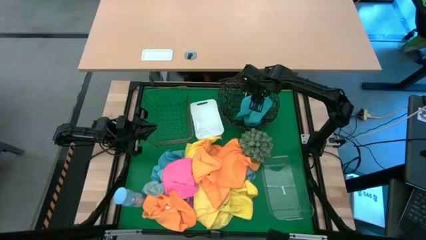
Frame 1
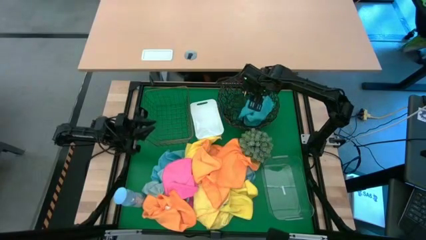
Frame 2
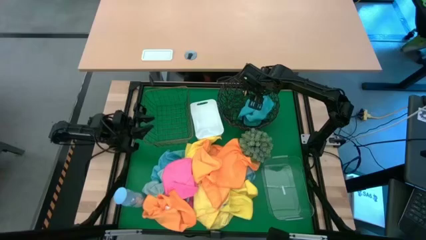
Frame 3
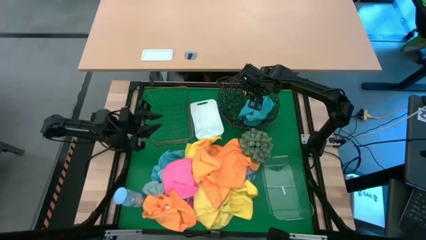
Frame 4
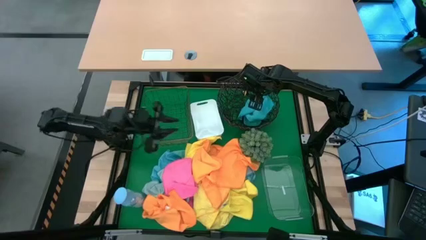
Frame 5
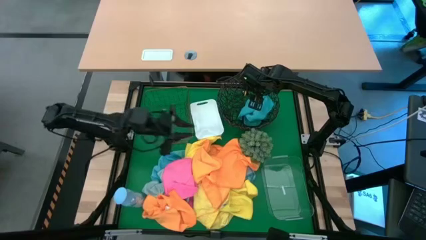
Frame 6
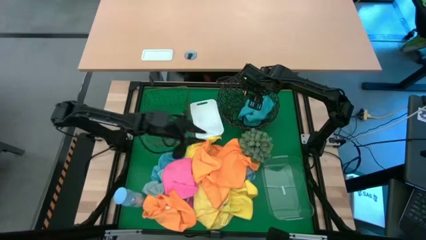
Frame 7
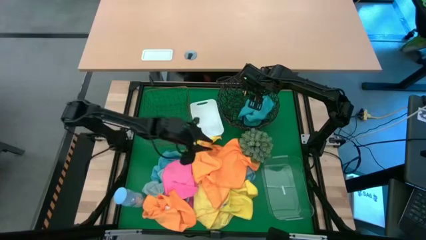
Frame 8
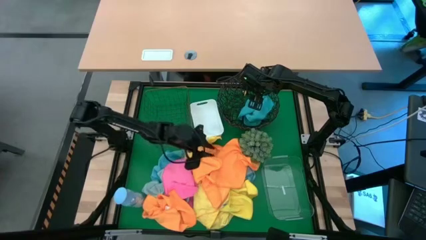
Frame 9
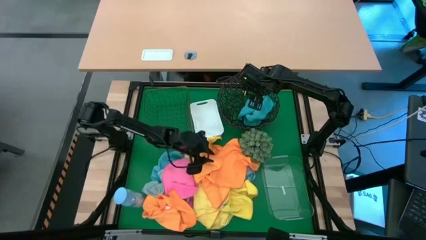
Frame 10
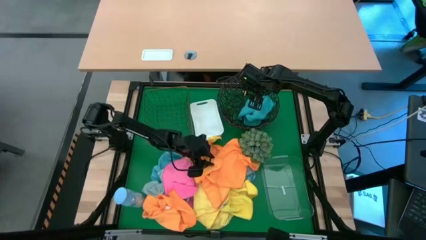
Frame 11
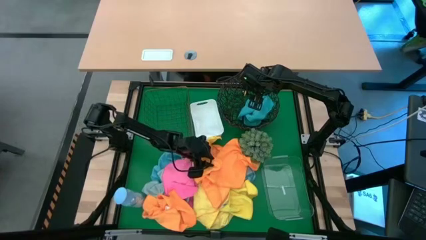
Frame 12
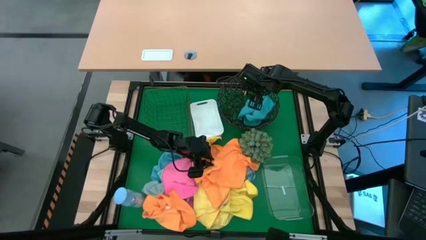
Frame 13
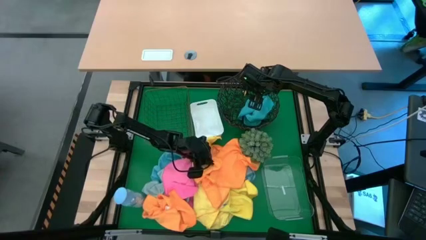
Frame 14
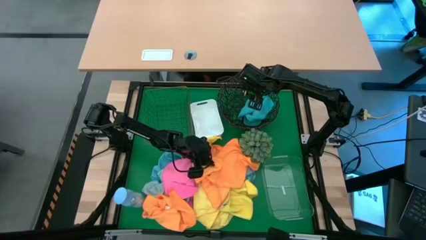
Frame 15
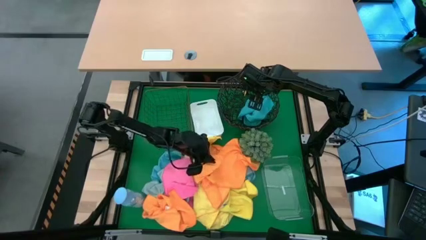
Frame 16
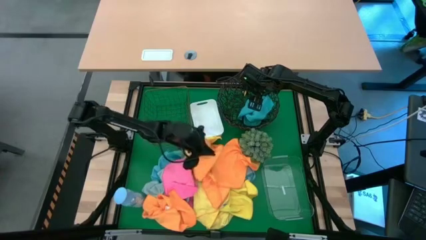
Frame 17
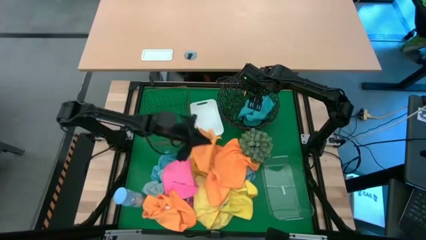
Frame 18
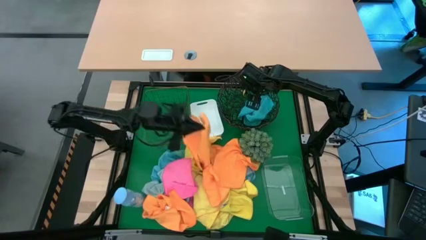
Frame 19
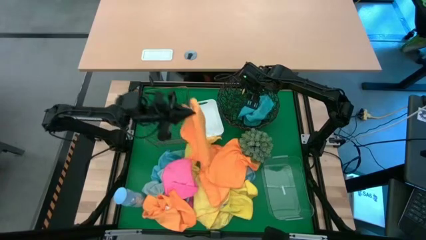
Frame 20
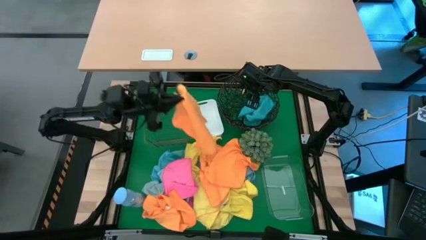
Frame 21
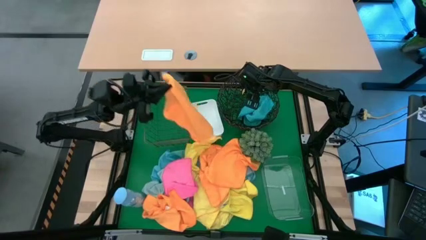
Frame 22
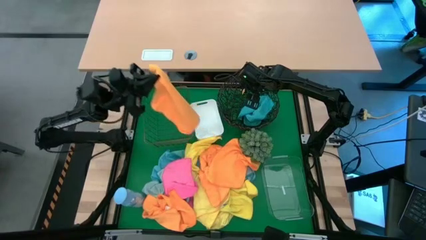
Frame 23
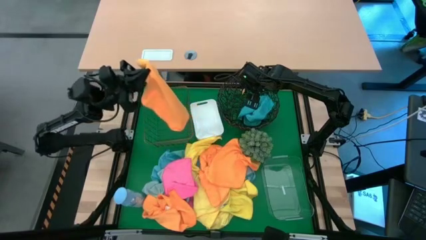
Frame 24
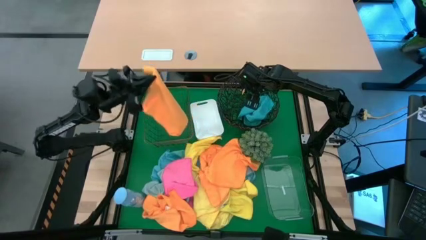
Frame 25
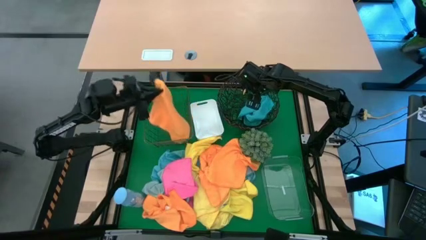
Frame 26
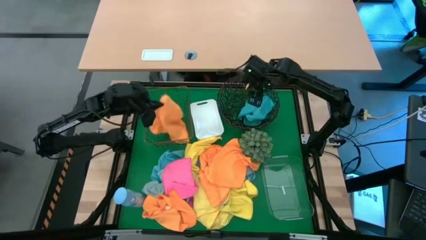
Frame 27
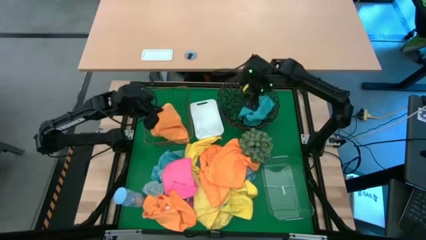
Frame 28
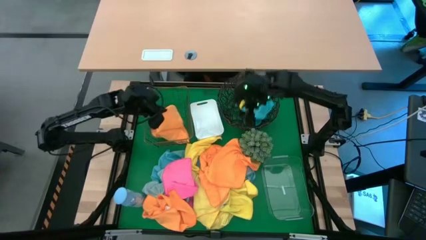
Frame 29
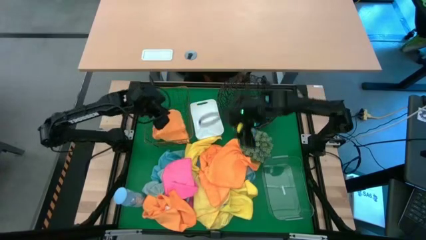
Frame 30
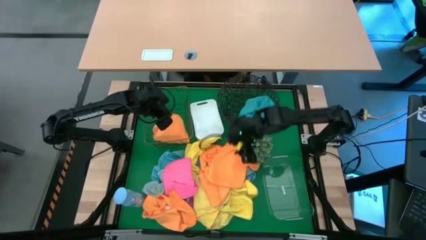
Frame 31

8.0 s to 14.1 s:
Task: Sort microfiber towel by color & place in baskets
Put the orange microfiber towel into the gold wire basket

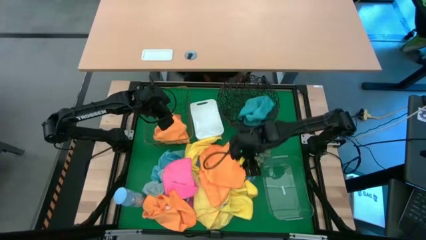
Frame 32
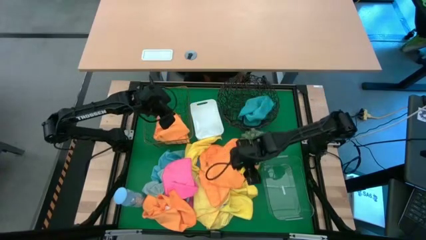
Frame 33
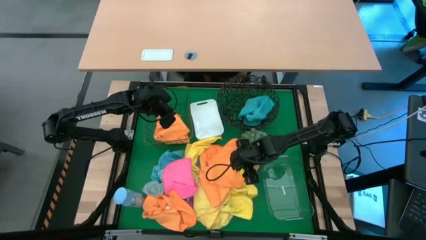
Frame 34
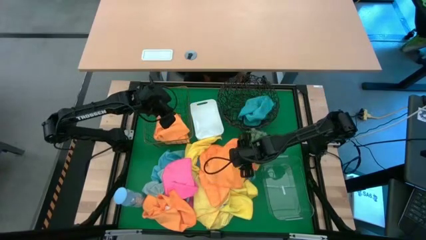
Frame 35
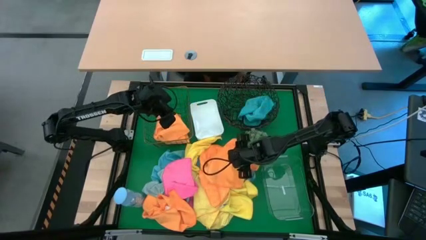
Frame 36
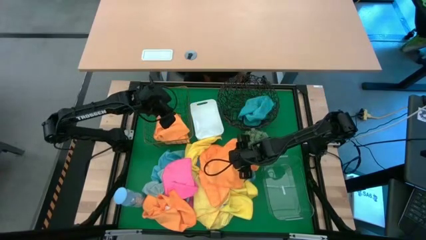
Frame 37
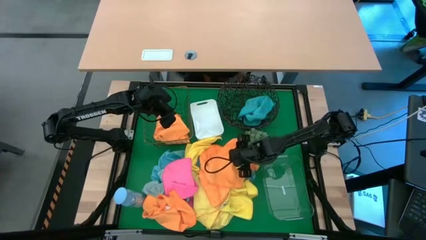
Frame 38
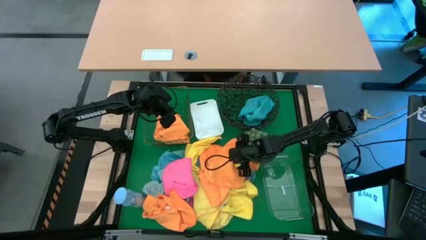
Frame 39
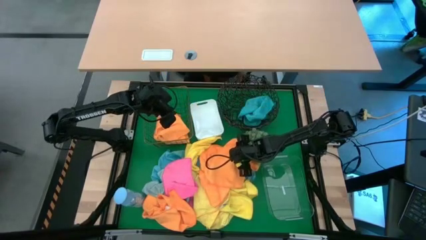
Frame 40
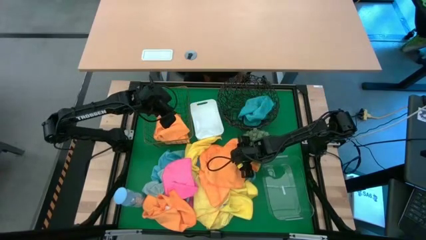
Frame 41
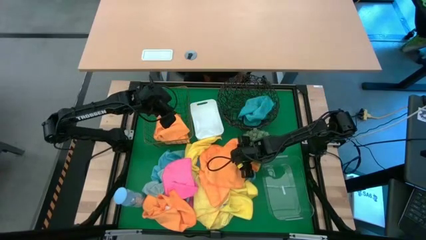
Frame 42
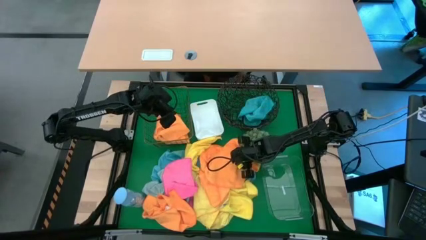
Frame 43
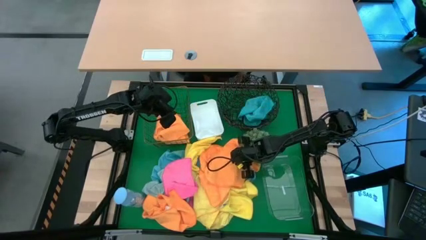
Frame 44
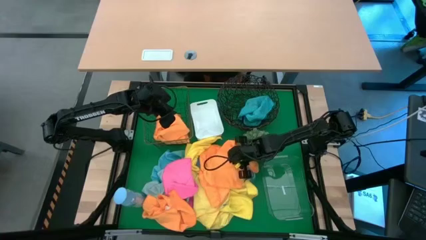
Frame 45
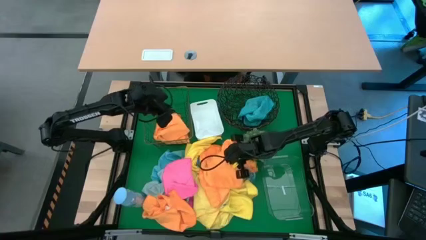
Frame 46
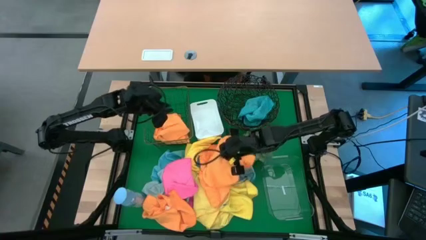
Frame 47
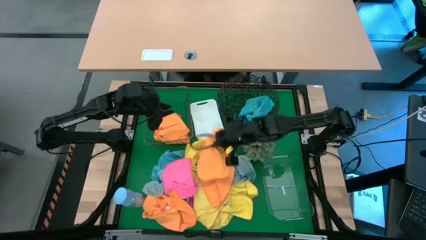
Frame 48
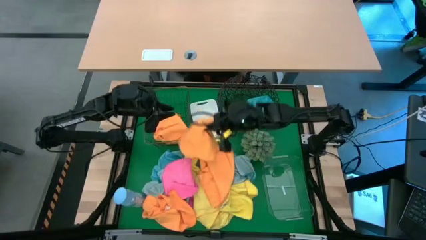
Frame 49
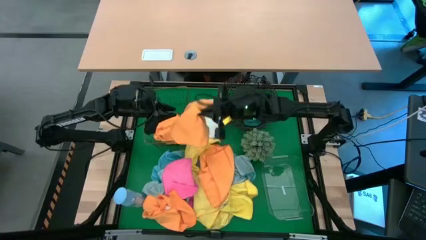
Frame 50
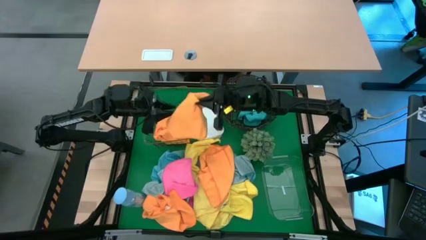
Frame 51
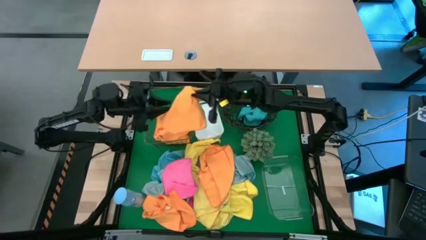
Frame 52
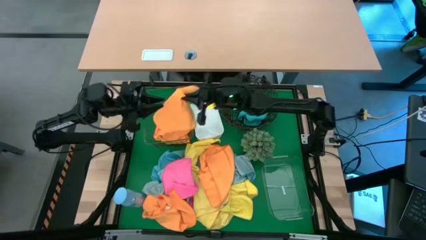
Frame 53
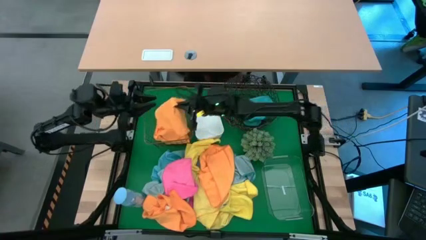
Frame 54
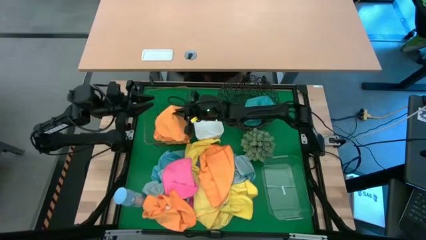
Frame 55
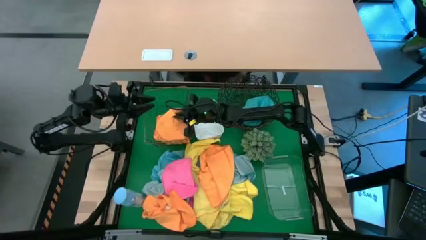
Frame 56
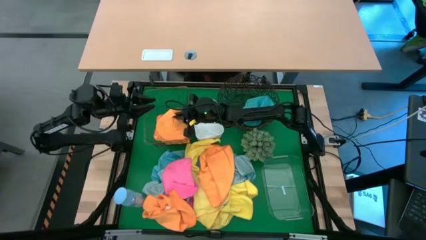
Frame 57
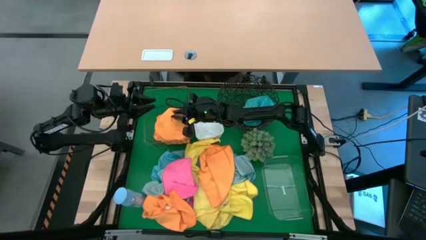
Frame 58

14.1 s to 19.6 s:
Put the orange microfiber towel into the gold wire basket

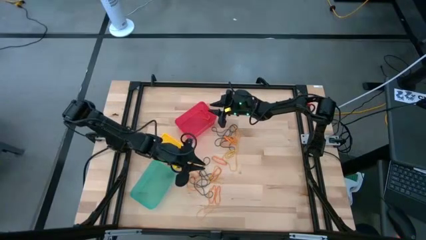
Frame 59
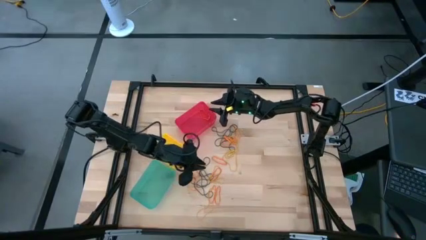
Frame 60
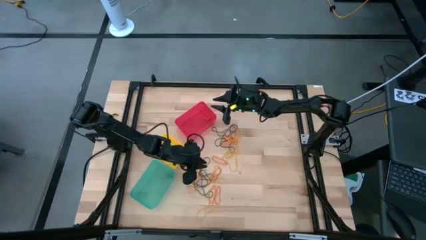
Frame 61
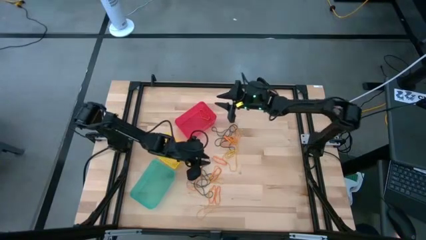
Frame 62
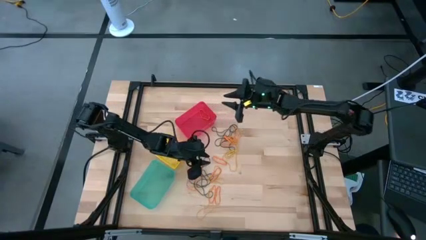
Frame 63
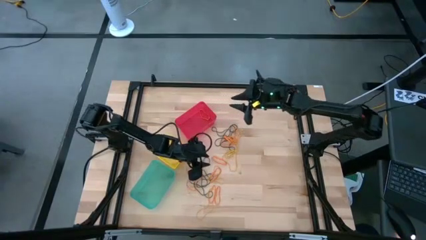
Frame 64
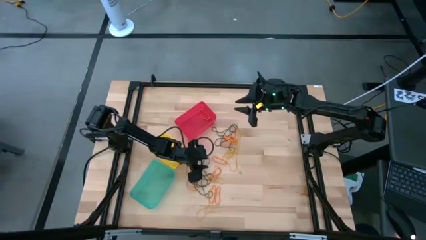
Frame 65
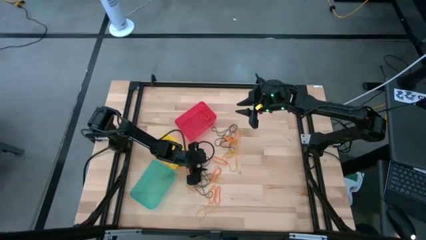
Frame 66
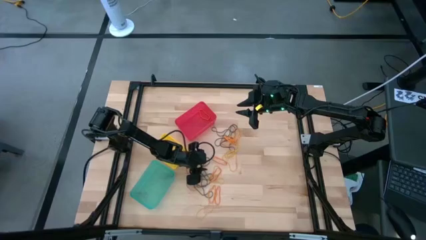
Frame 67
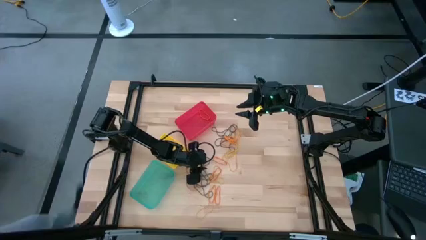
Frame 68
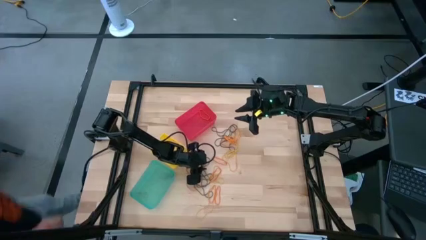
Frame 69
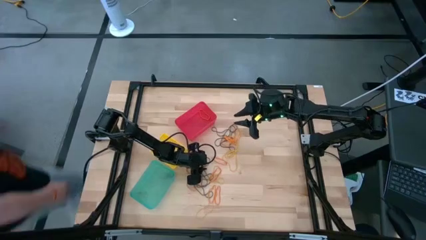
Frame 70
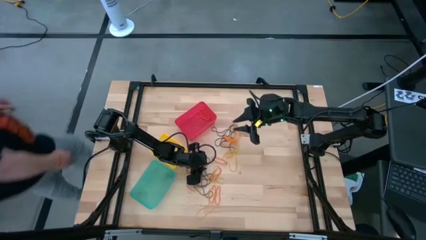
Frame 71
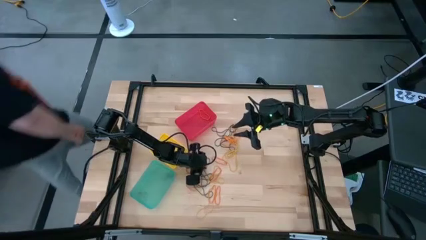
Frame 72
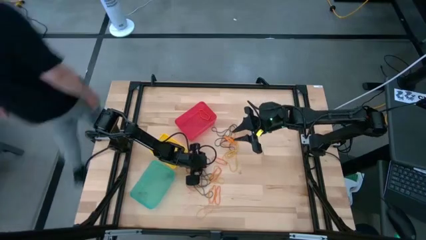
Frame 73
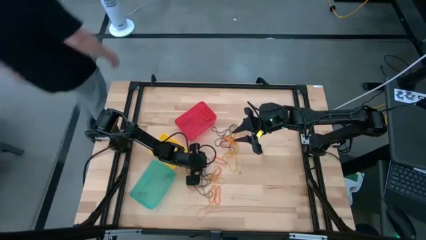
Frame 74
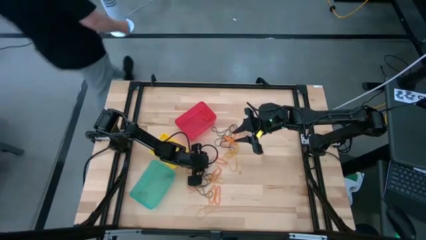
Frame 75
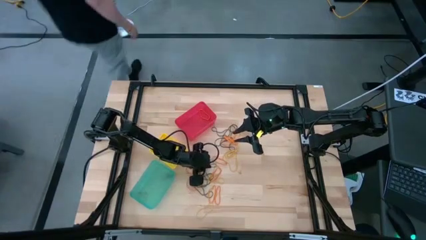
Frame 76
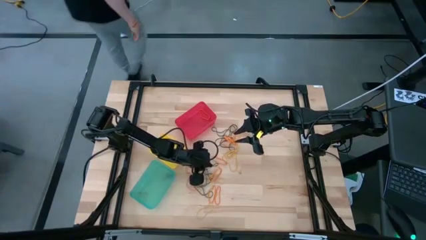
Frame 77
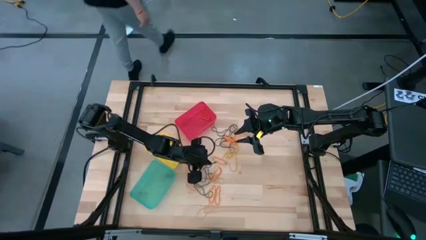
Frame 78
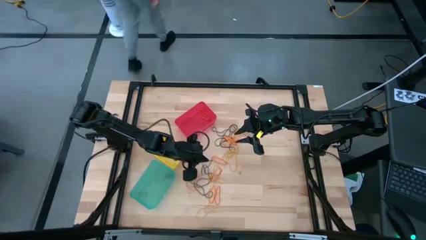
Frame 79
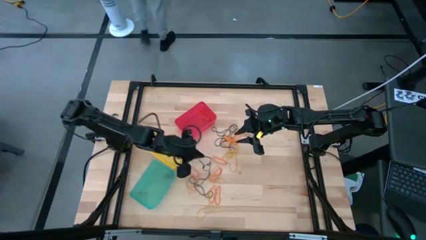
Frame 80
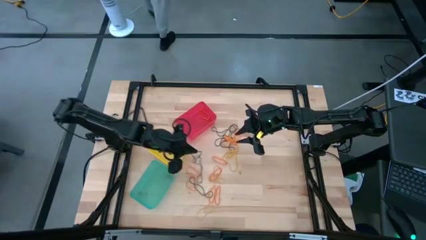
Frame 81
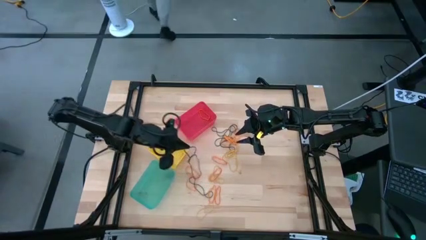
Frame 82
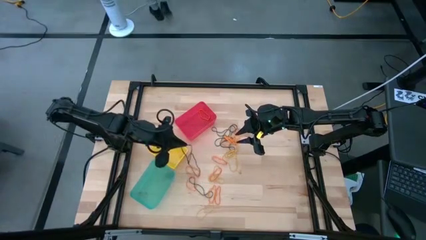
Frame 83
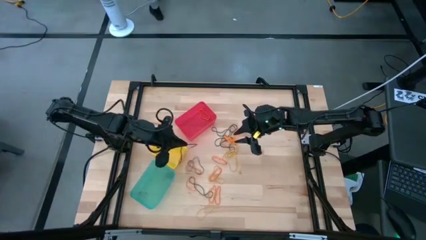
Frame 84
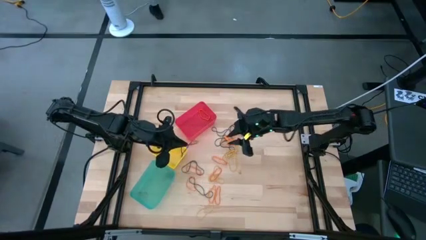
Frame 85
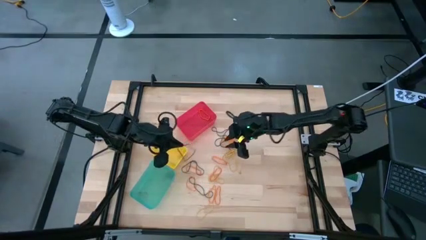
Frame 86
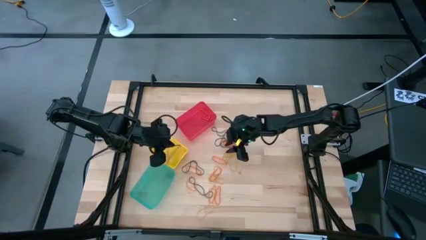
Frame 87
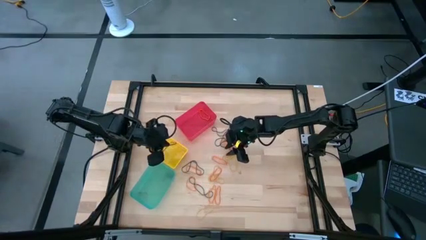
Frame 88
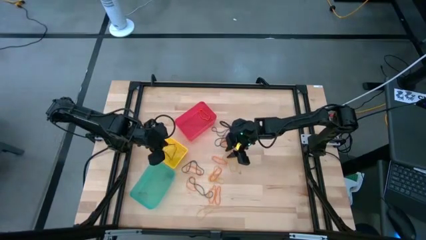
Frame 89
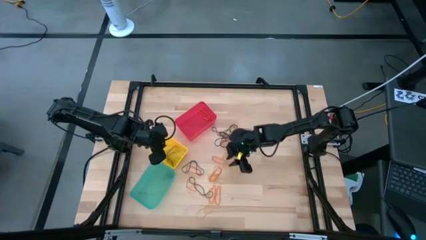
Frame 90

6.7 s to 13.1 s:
Task: Sort rubber bands into baskets
Put the black rubber band into the yellow bin
